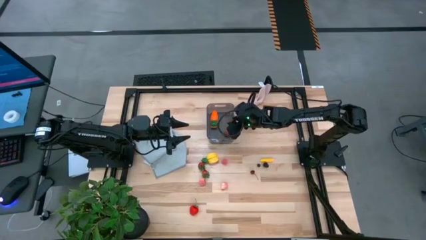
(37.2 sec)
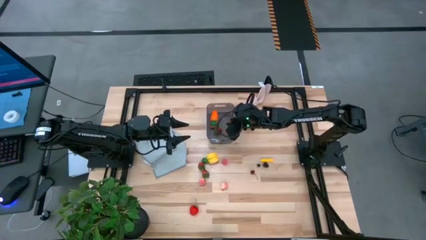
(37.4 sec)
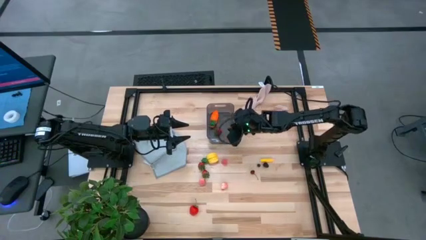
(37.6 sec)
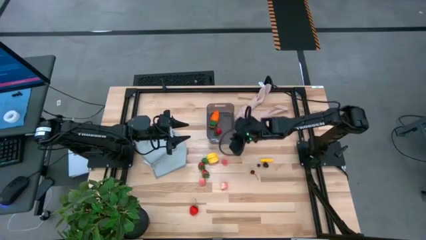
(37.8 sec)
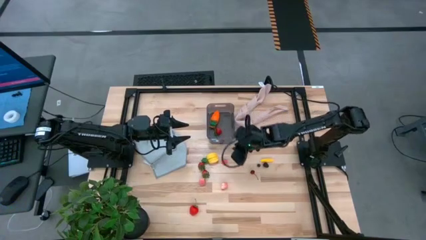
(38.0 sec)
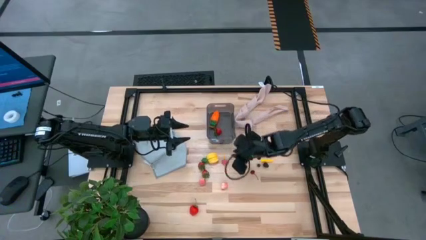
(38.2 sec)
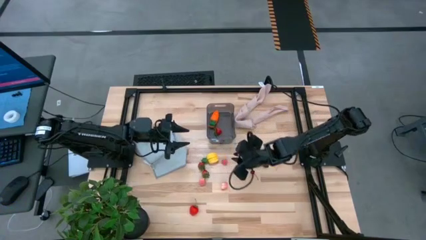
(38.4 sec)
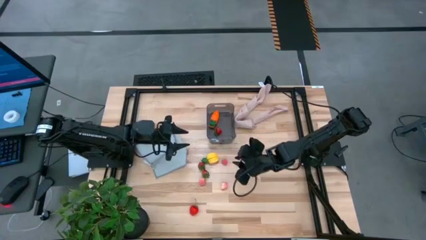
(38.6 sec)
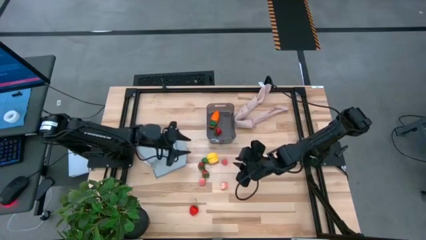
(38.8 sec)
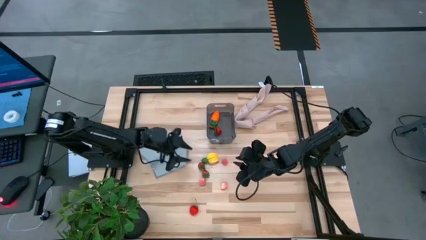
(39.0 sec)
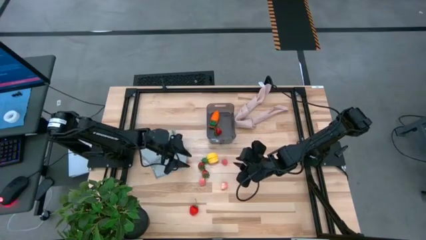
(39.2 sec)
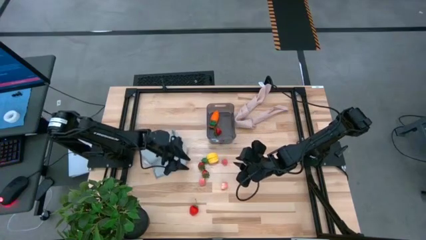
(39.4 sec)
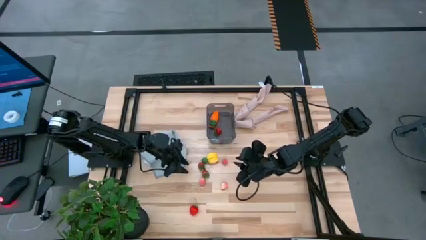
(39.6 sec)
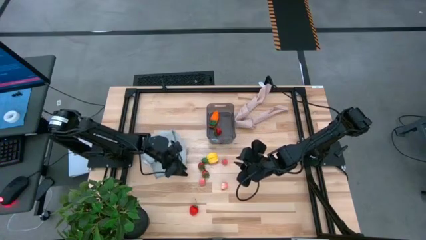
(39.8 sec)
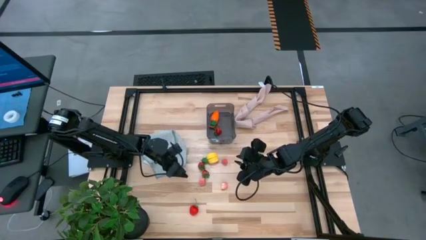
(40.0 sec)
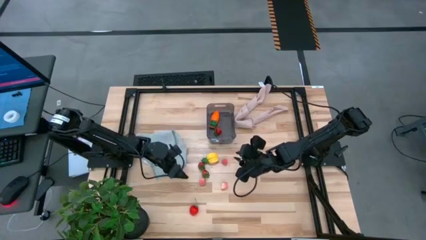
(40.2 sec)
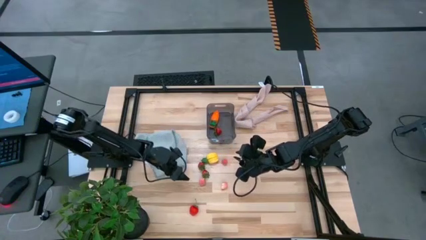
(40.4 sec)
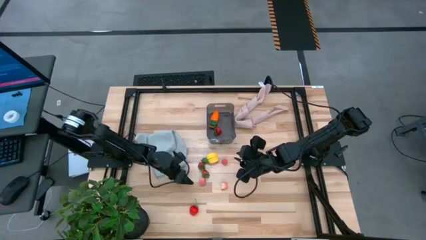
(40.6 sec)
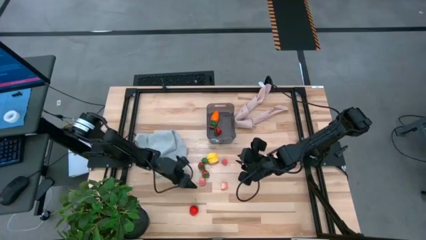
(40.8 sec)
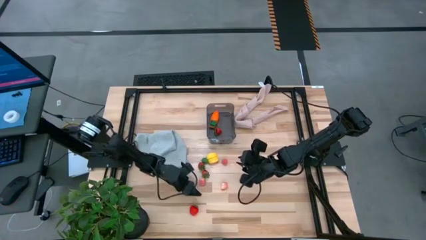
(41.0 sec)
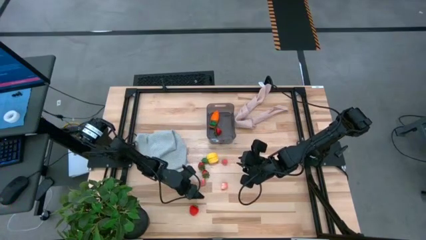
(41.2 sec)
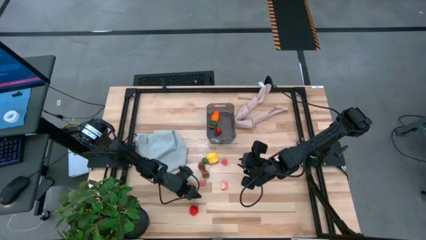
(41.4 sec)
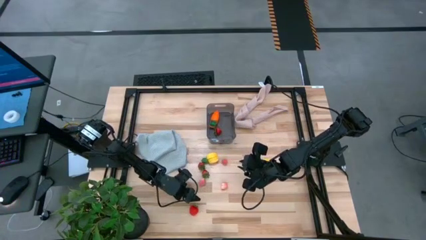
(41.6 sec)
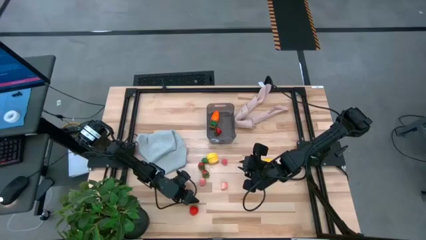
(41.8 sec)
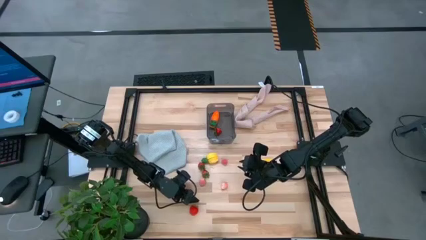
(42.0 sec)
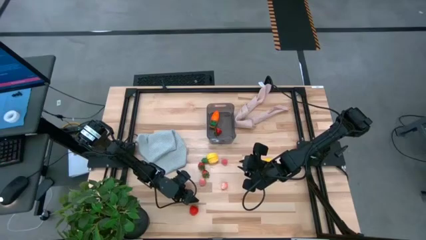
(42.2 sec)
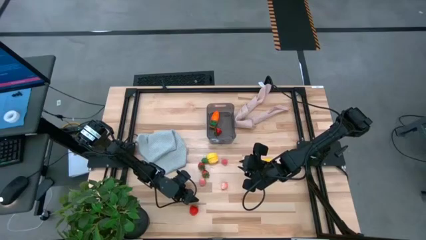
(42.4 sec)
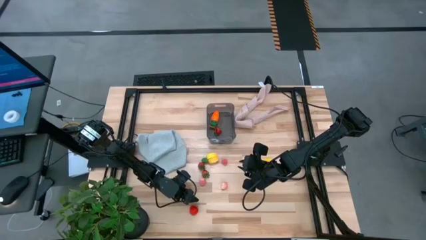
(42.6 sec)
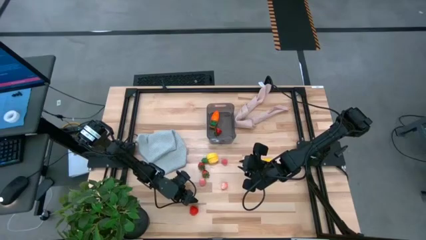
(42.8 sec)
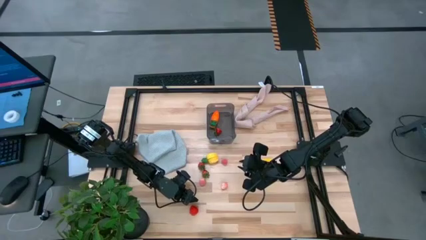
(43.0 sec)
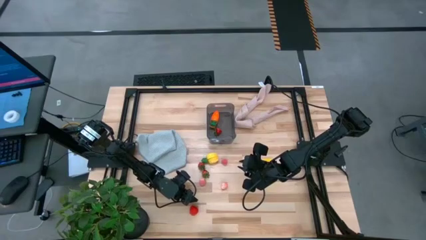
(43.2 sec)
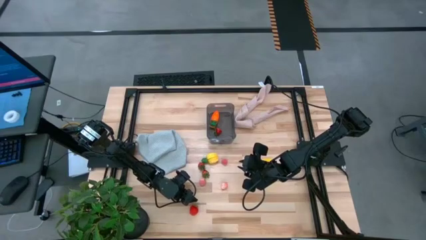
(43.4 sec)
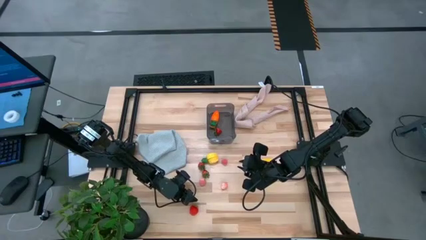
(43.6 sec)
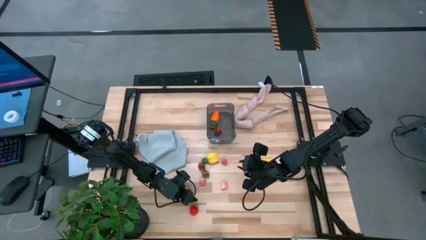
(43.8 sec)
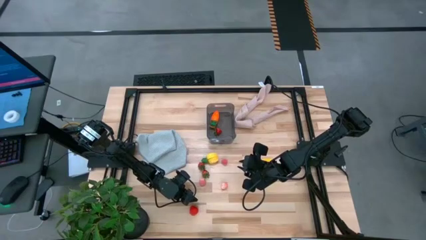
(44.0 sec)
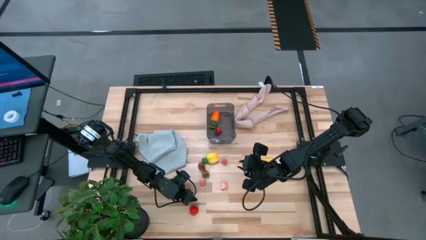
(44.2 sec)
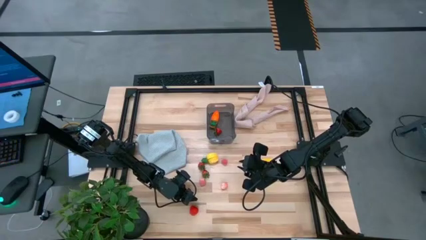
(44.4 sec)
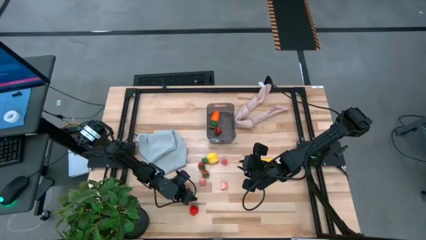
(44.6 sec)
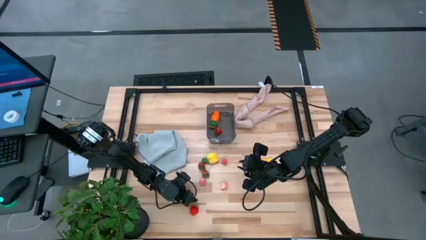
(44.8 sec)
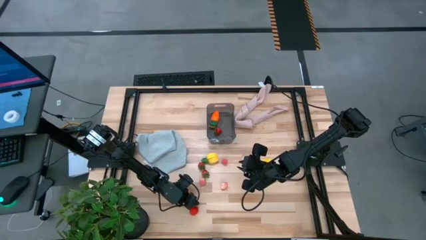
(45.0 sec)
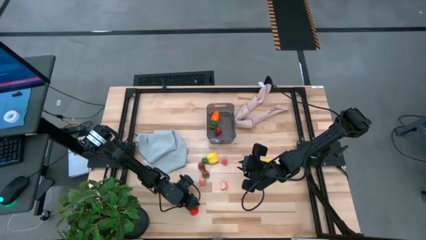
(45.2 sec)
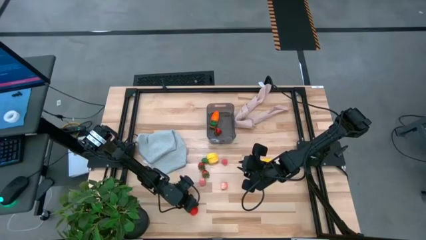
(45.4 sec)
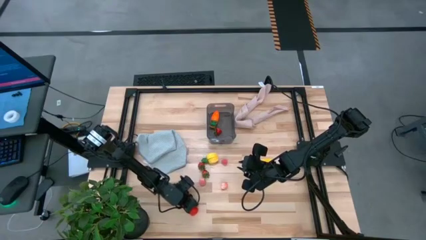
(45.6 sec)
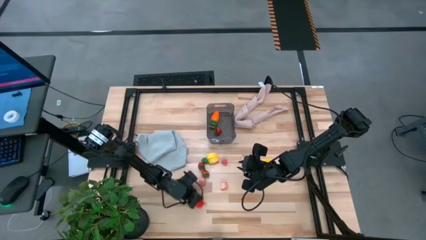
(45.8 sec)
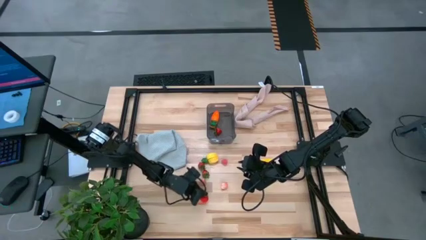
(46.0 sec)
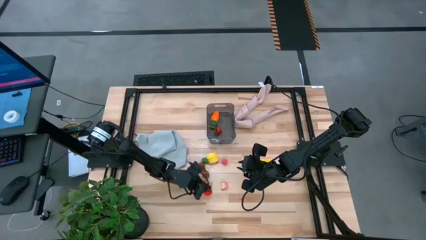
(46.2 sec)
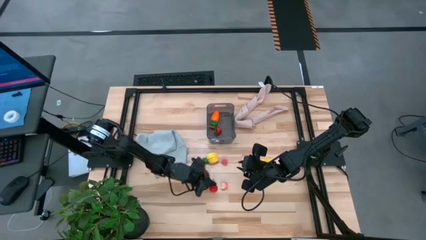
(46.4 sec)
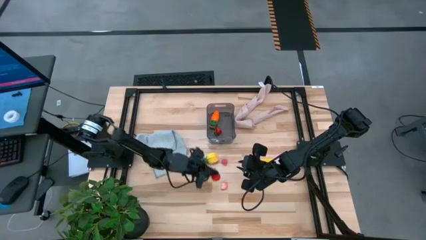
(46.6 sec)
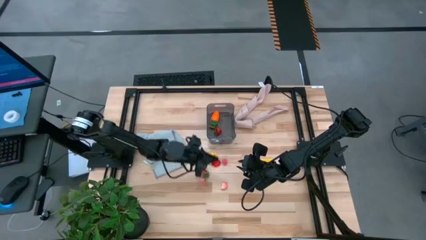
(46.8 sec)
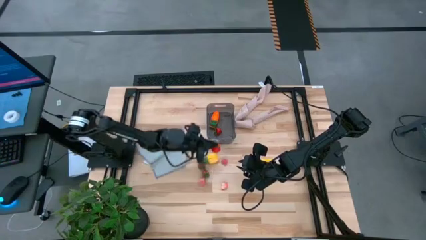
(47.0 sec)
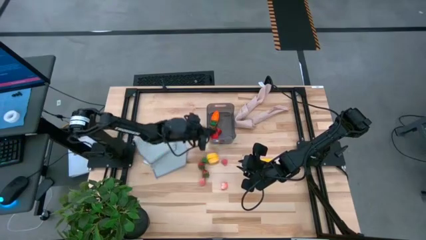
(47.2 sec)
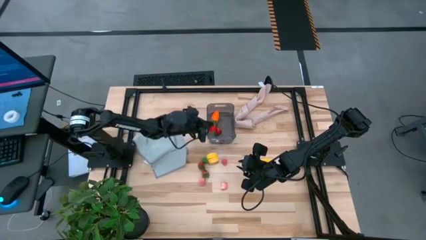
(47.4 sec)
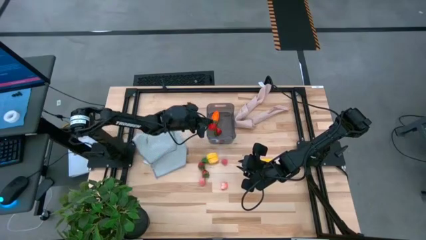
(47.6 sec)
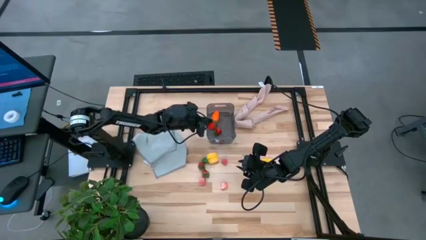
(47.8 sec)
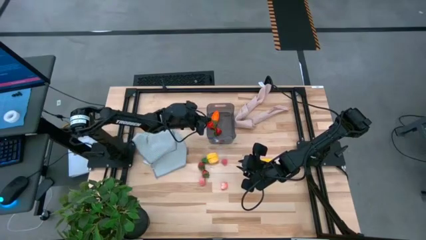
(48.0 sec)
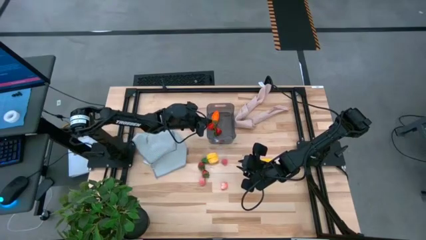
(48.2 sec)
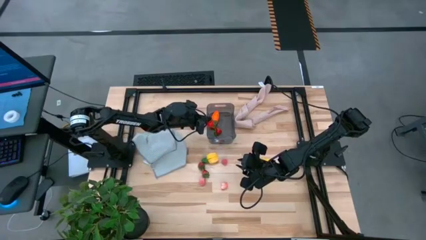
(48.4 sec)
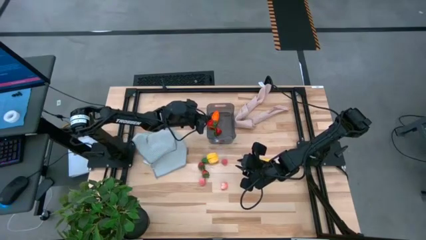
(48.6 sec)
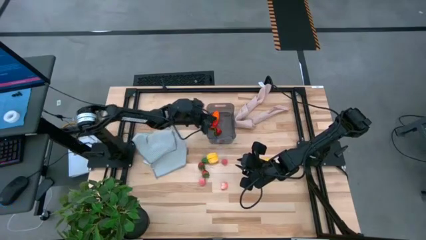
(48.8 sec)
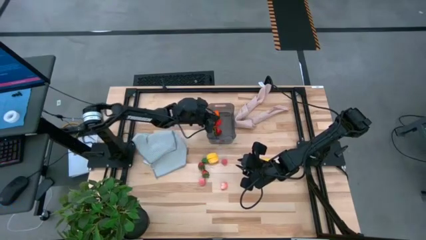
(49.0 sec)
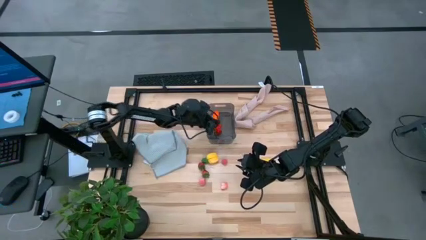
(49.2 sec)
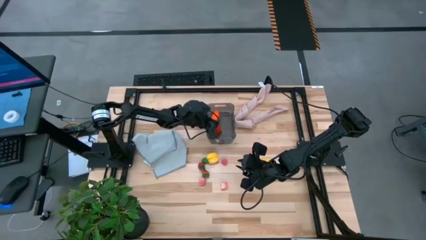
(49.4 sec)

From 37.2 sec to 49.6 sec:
Task: Pick and placing Produce into tupperware
Put the red strawberry into the black bin

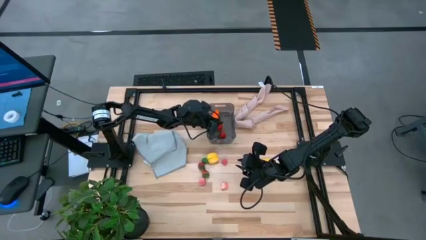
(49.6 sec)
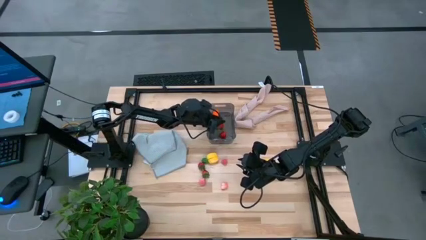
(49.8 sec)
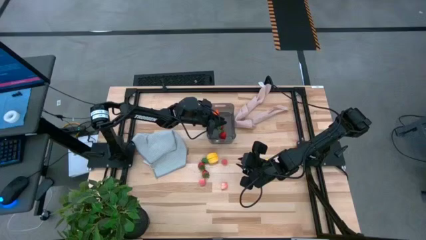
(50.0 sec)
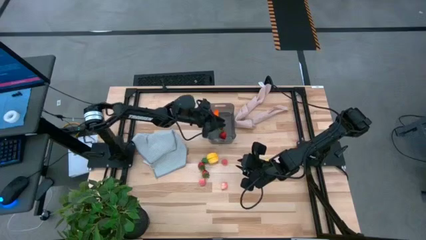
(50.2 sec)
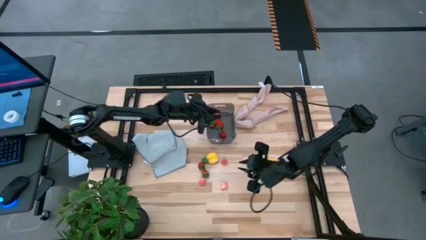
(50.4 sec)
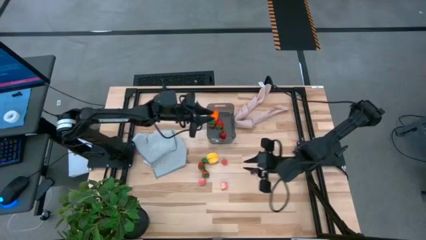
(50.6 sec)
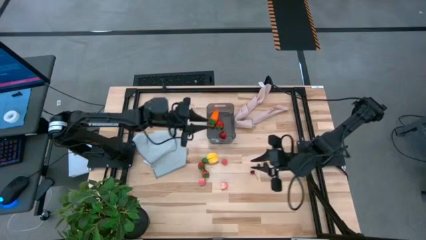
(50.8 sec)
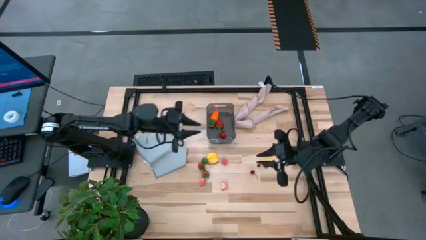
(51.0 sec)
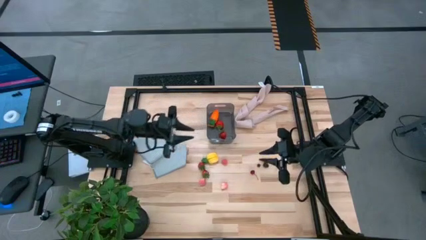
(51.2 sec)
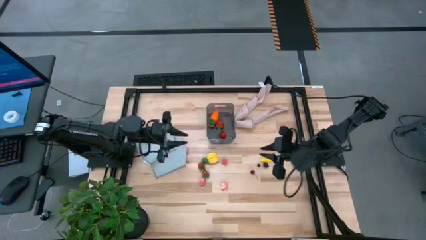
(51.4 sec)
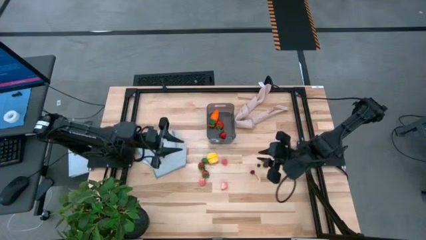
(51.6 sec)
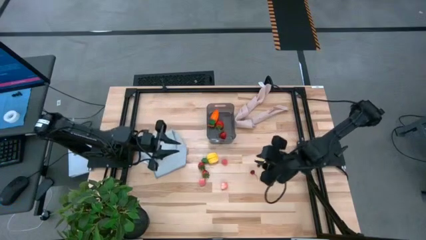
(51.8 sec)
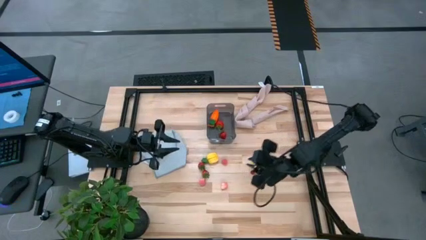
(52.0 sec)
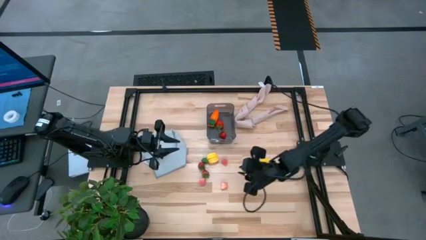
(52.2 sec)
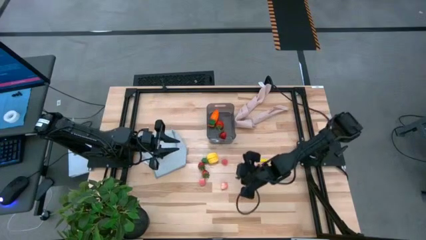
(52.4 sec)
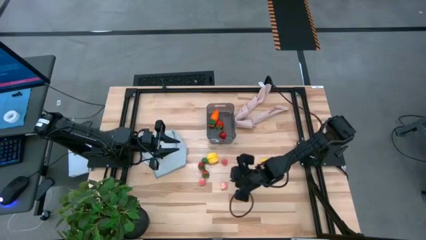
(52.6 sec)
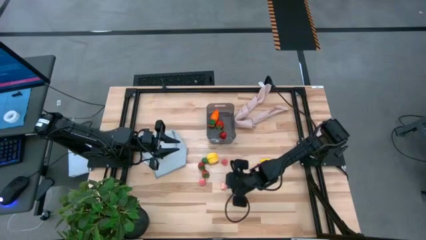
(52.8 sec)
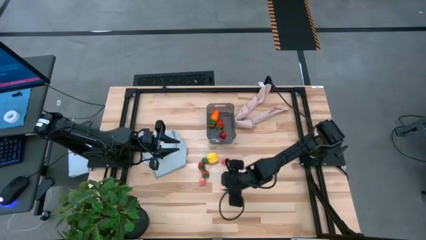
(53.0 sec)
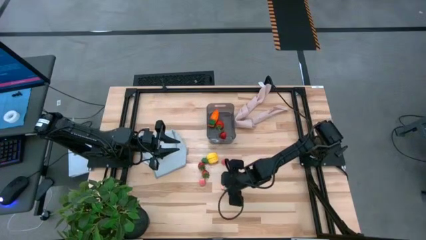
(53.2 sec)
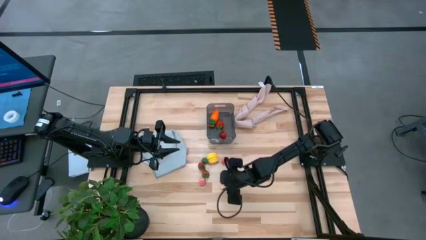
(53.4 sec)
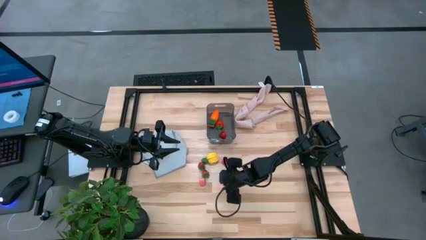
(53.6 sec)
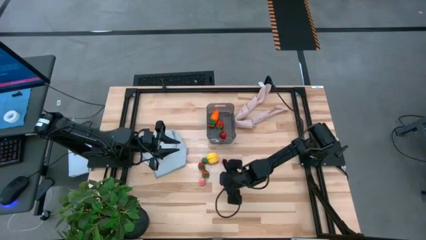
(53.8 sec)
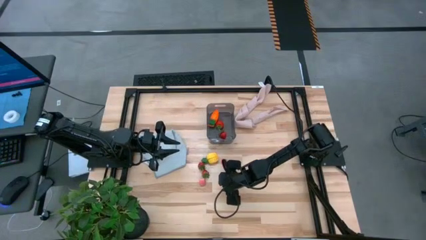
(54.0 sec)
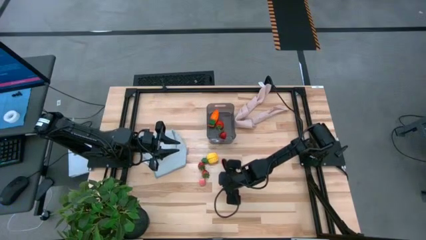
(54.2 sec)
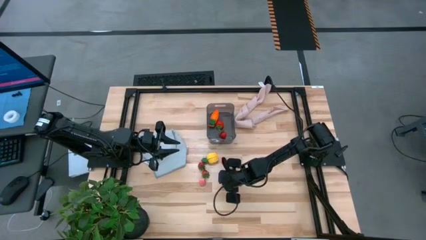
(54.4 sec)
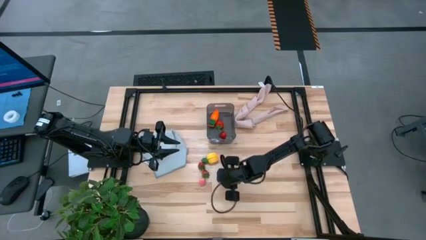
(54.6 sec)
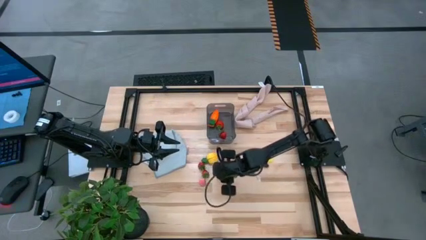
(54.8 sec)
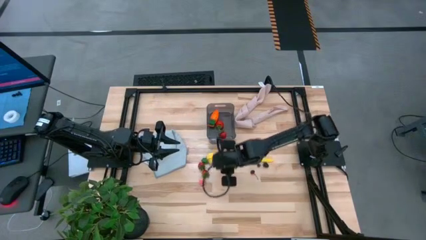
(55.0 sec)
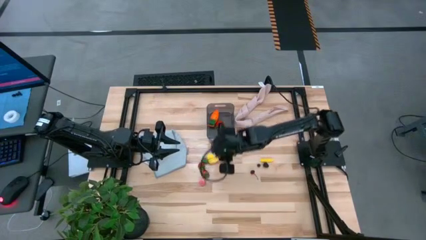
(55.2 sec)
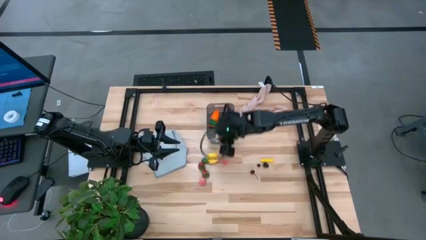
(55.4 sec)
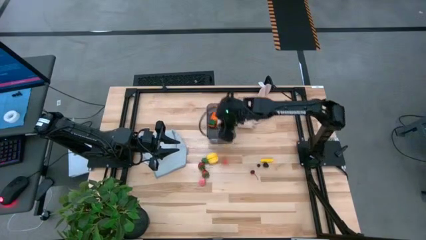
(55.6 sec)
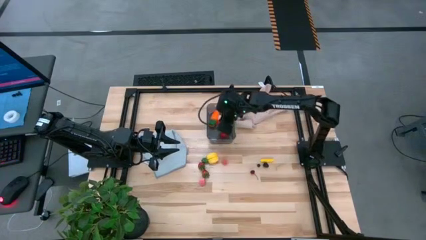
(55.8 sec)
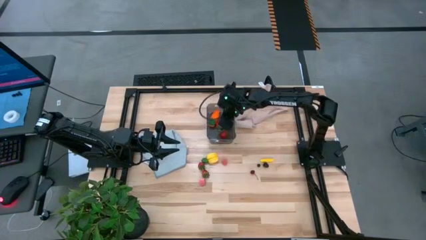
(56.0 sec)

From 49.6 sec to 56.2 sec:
Put the pink peach into the black bin
